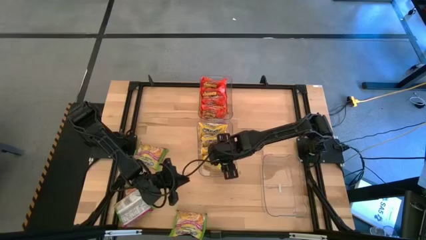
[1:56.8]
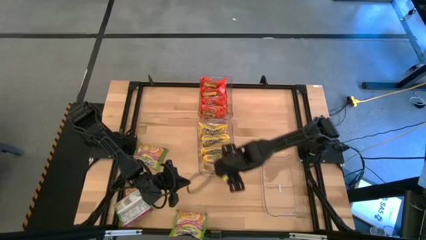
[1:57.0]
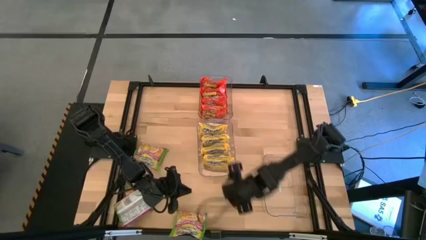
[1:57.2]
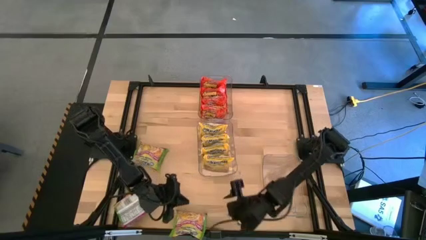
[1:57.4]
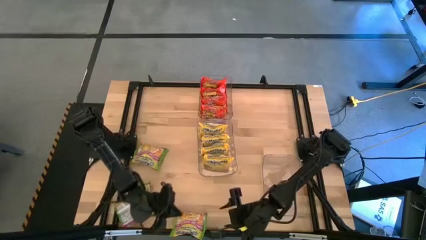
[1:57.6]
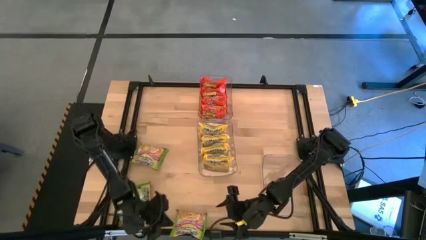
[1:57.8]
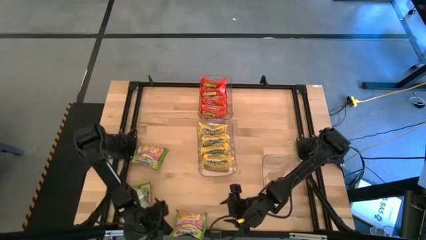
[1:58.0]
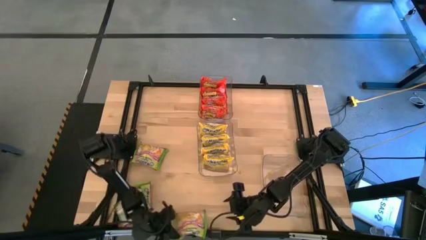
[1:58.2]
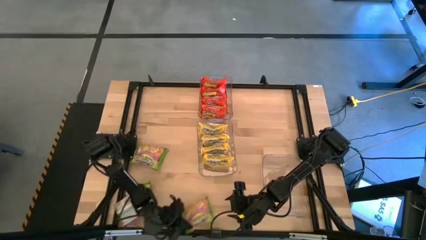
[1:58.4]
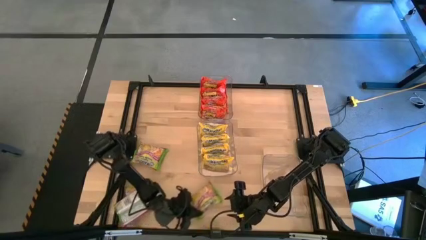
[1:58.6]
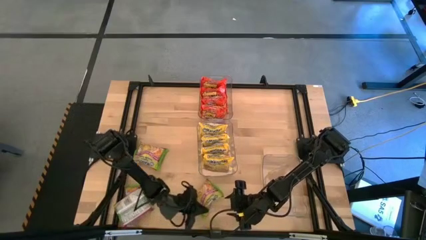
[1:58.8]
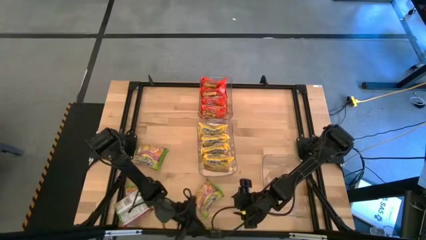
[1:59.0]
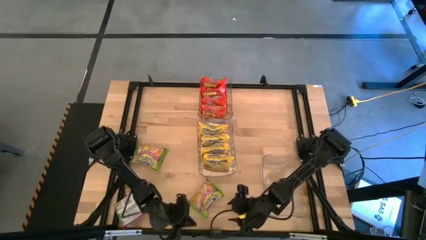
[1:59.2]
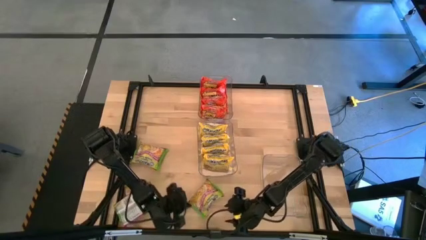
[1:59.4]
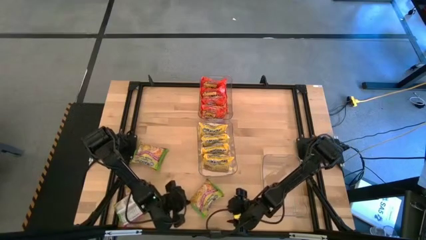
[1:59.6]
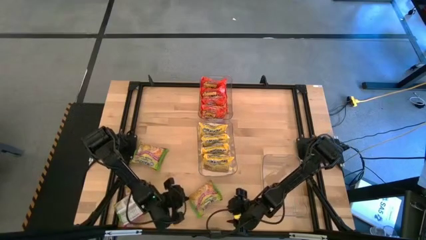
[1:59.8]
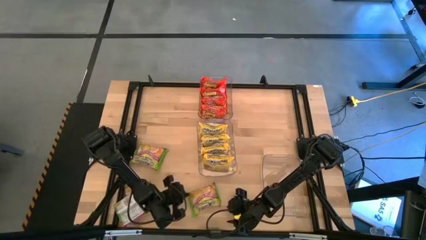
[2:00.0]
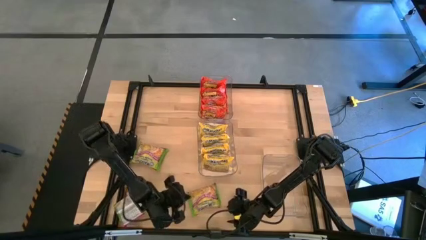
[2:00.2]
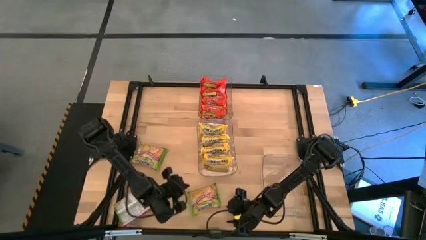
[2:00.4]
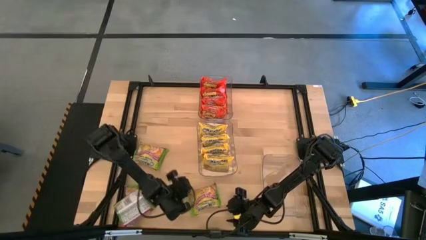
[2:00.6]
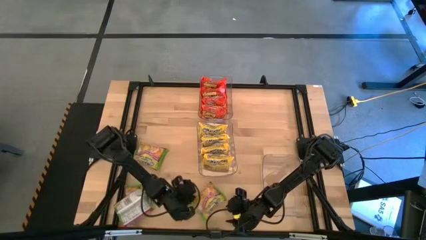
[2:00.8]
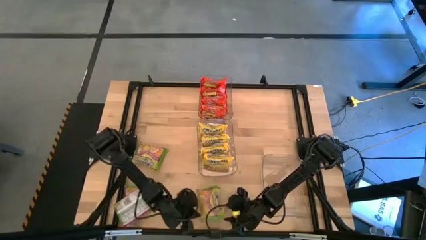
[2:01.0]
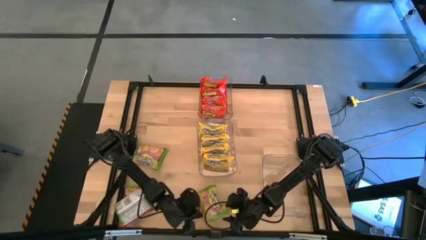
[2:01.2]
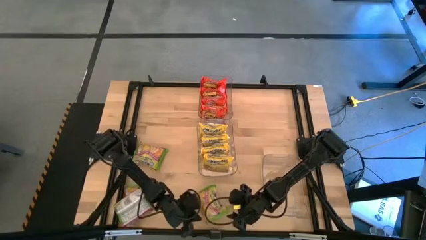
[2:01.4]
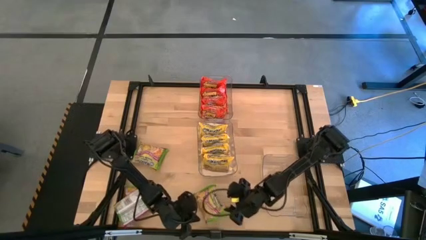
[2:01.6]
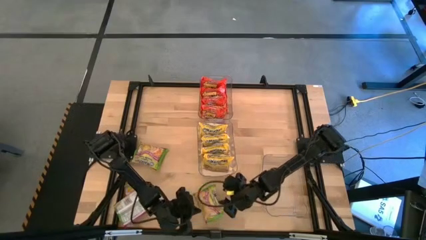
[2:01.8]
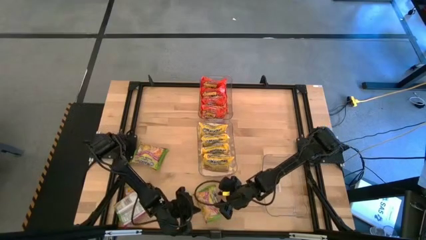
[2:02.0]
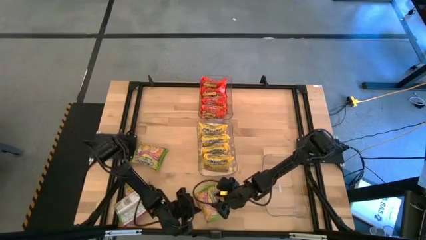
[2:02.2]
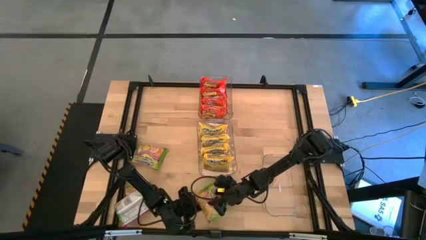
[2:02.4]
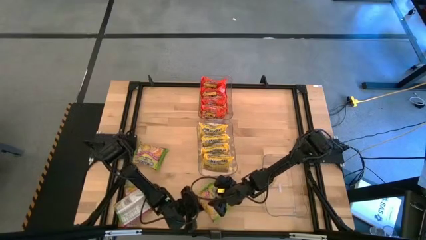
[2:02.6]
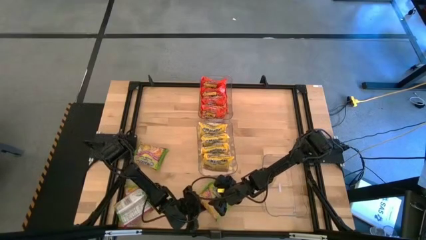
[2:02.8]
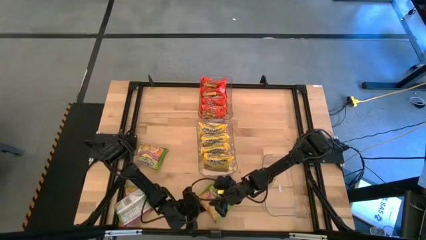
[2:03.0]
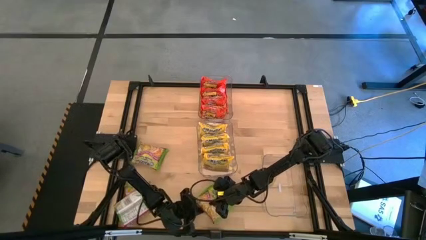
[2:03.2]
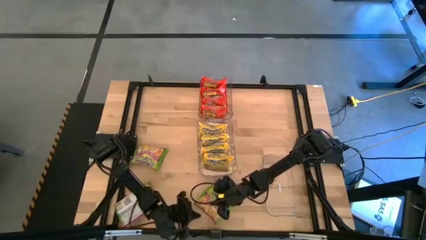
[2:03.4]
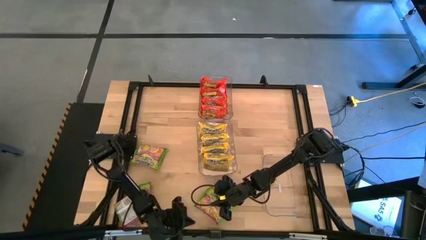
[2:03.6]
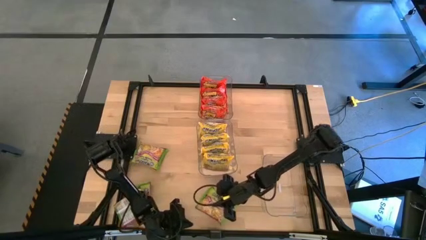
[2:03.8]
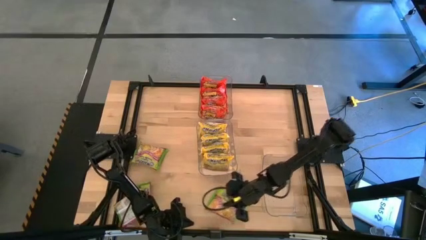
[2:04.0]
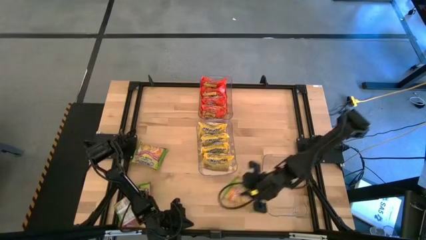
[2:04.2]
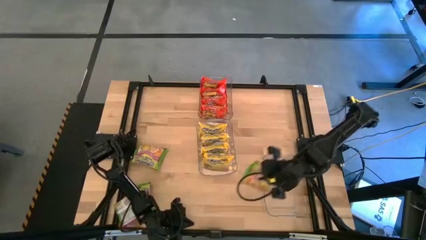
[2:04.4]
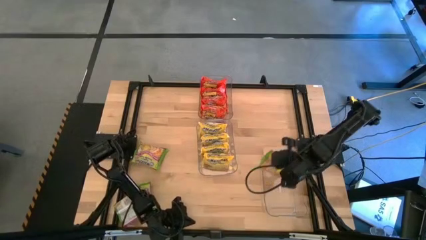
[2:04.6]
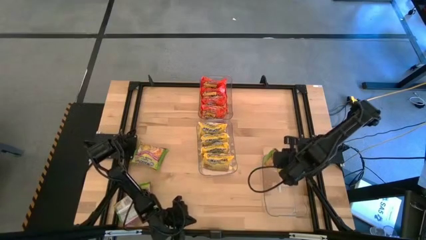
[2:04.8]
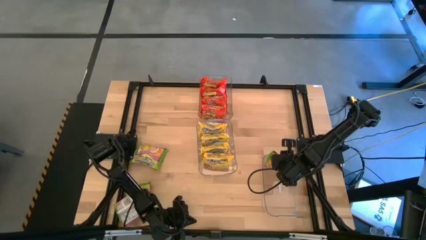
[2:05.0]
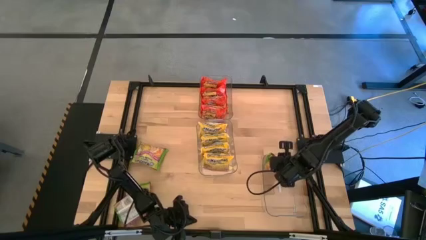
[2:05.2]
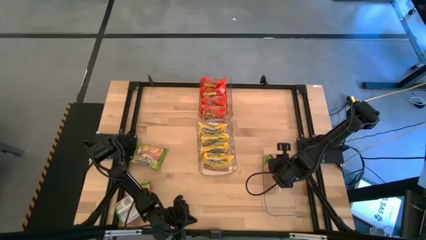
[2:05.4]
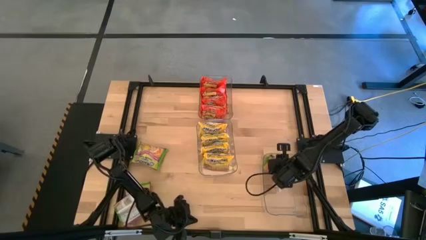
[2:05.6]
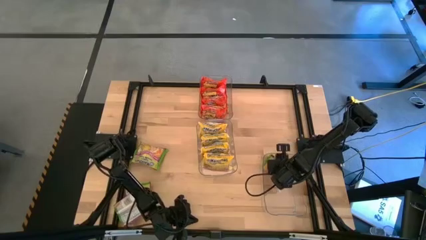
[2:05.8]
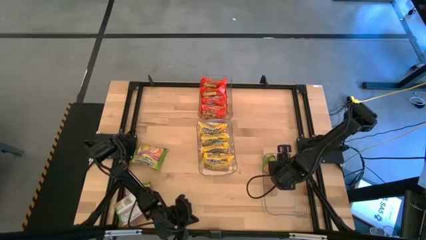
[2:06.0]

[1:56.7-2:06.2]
Task: Sort Maruchan noodles
Put the green noodle pack into the bottom transparent bin

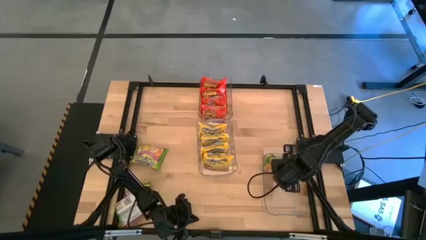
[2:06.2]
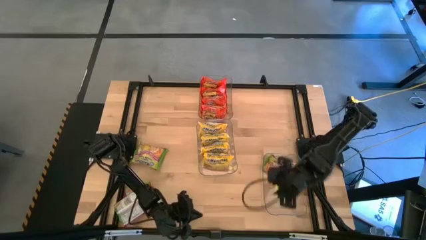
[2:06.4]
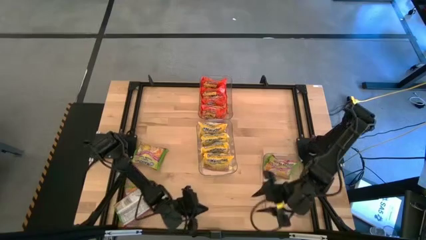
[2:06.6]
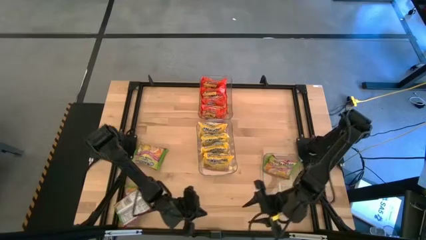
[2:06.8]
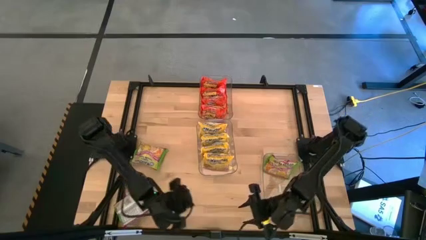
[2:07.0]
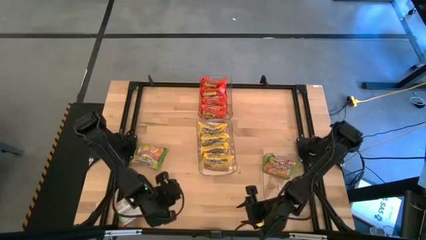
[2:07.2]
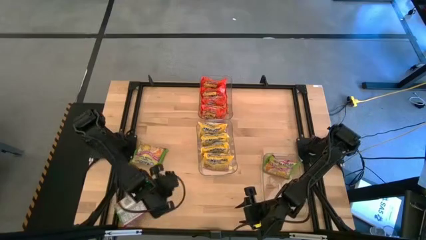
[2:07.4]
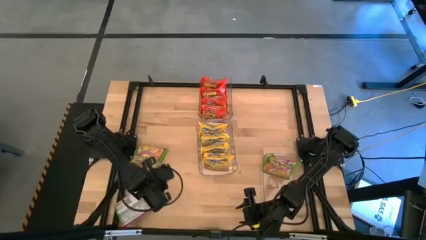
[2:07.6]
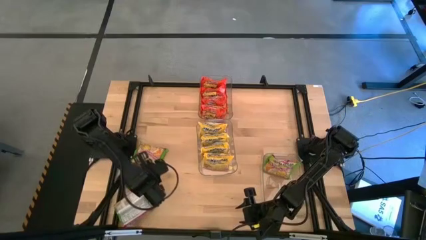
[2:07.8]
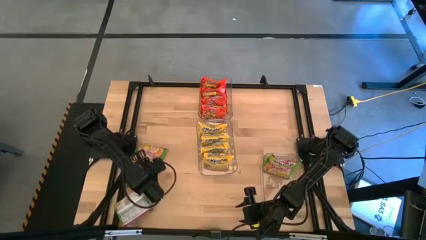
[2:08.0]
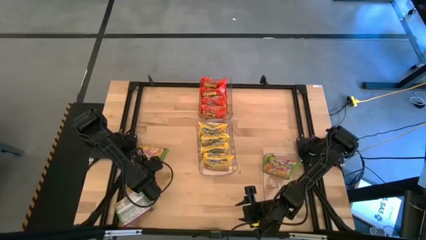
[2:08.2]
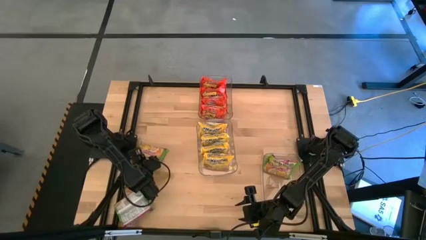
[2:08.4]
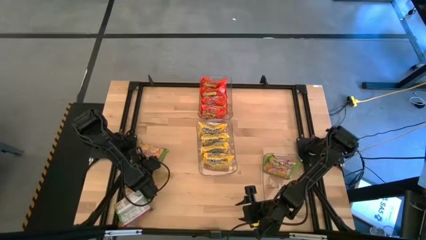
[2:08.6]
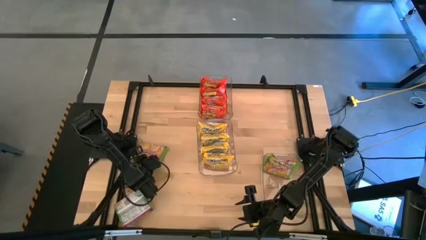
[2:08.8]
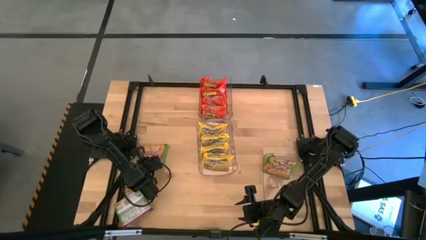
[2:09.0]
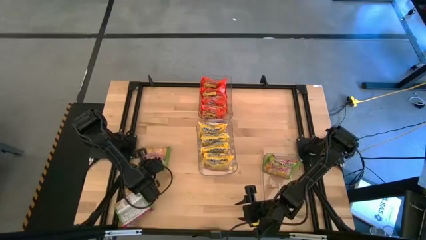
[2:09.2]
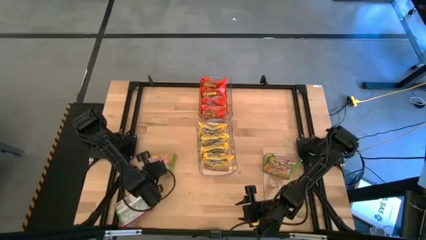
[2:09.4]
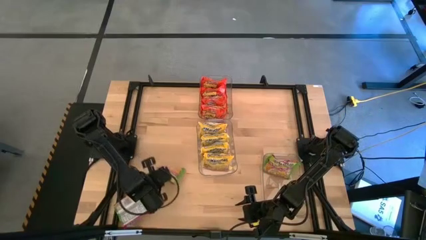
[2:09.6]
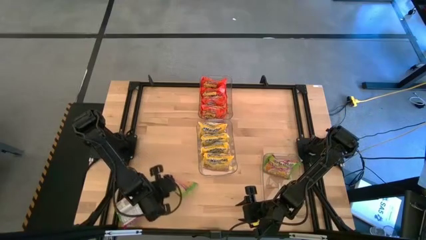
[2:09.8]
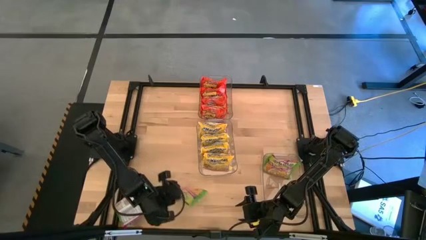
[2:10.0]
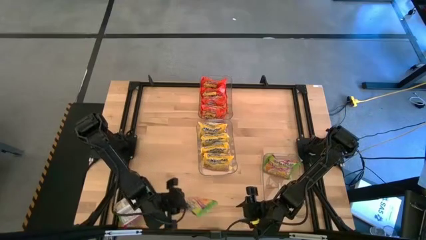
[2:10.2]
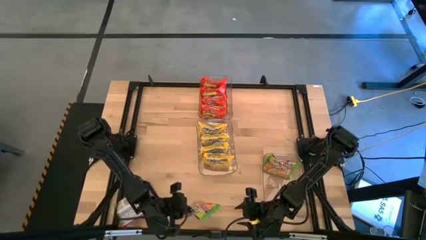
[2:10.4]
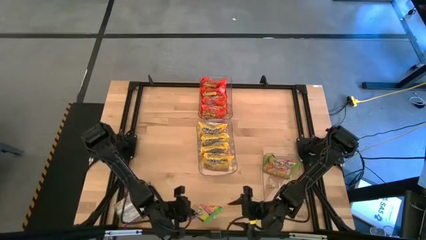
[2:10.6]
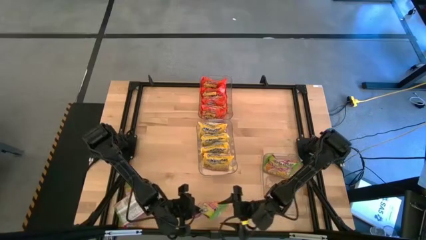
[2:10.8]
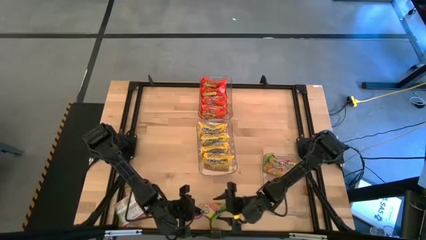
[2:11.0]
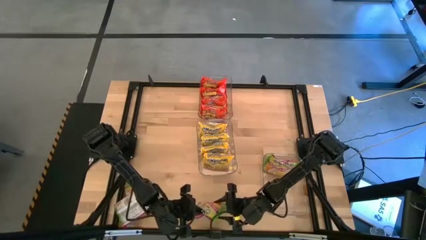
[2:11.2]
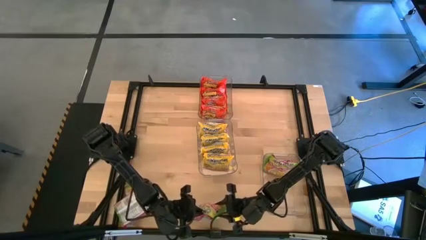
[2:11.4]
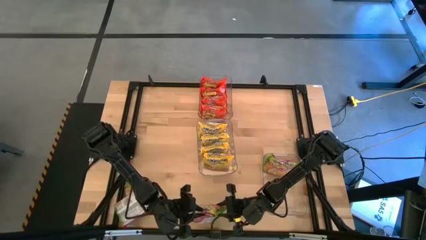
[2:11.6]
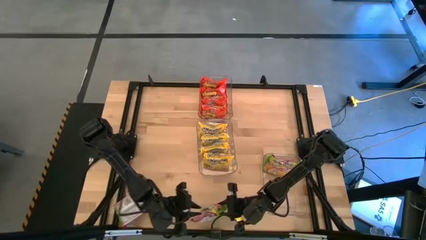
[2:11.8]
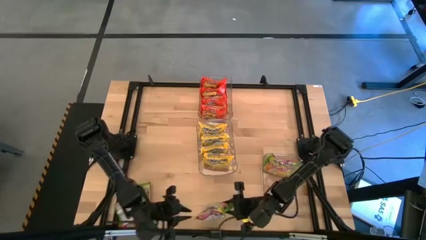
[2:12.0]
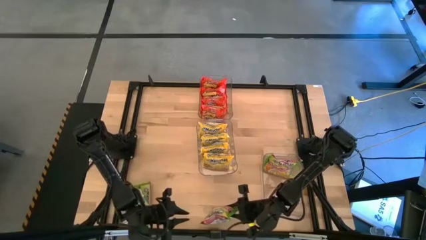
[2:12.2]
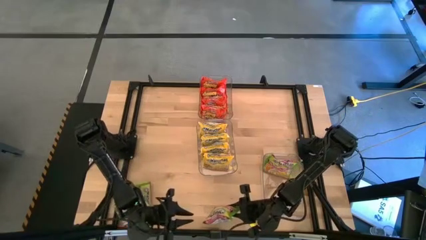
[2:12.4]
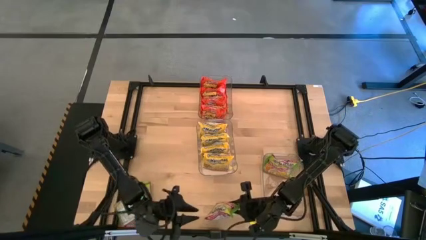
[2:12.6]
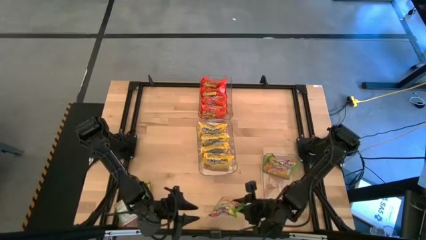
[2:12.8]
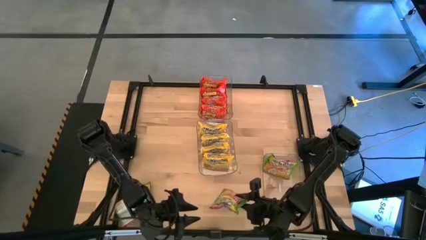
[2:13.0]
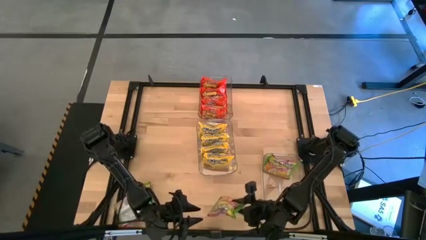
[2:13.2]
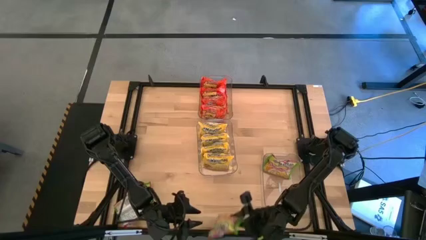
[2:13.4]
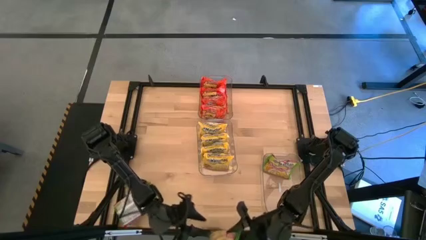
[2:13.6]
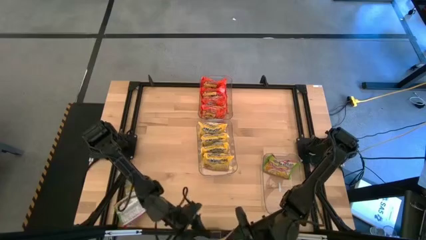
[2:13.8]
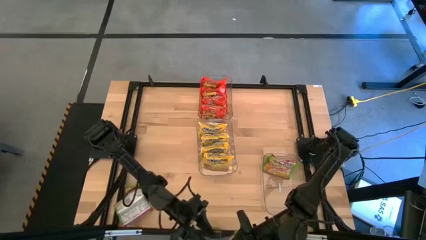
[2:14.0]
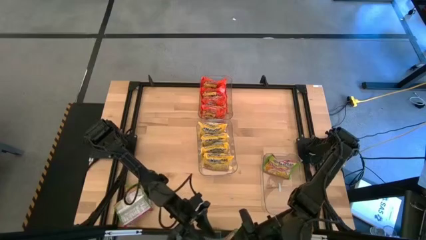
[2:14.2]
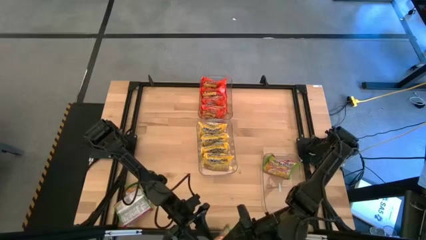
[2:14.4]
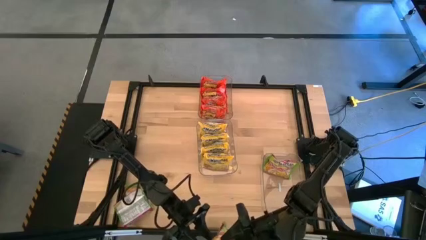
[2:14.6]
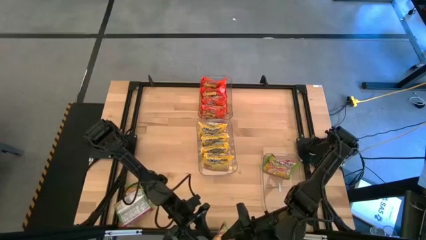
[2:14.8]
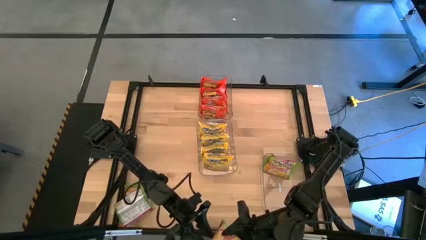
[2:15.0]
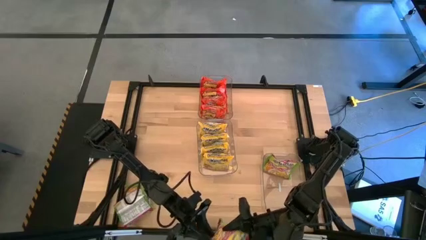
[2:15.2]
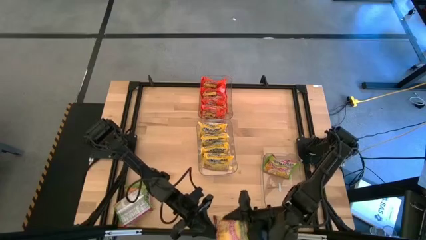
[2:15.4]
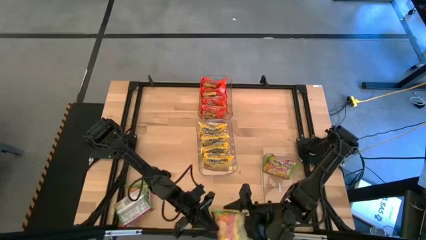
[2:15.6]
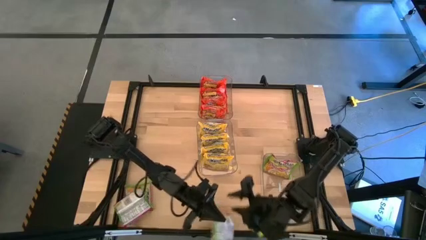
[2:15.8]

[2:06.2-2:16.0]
Put the green noodle pack into the bottom transparent bin
